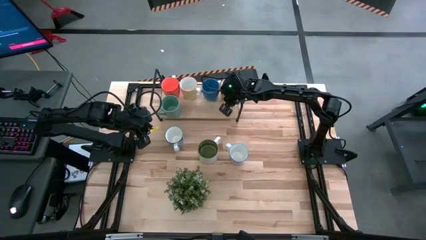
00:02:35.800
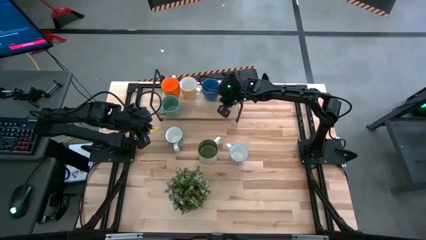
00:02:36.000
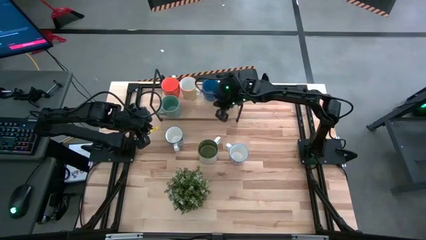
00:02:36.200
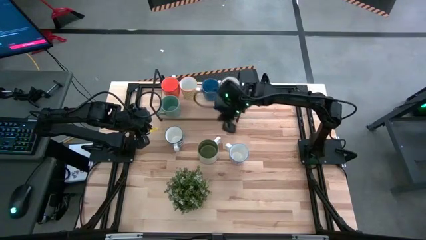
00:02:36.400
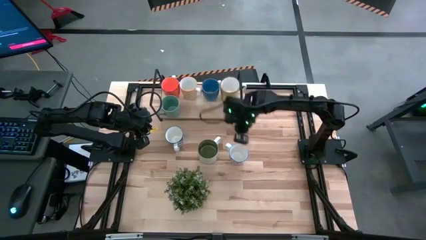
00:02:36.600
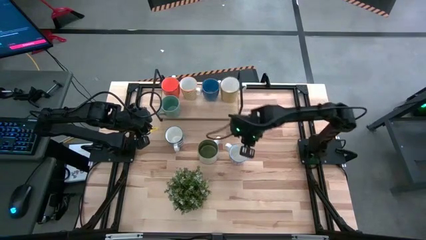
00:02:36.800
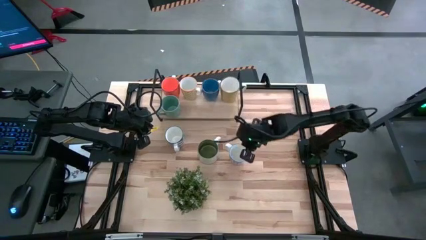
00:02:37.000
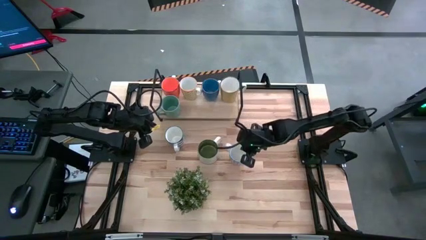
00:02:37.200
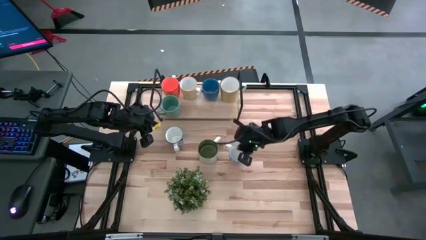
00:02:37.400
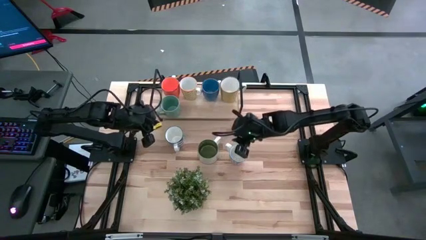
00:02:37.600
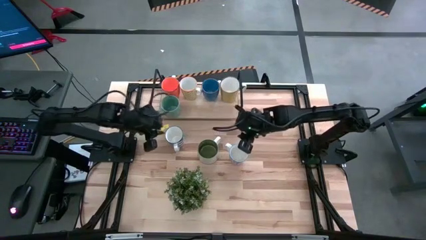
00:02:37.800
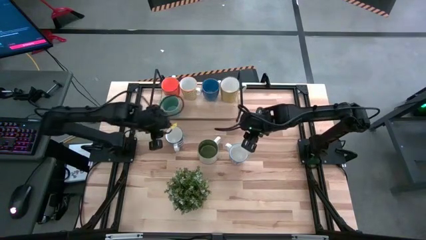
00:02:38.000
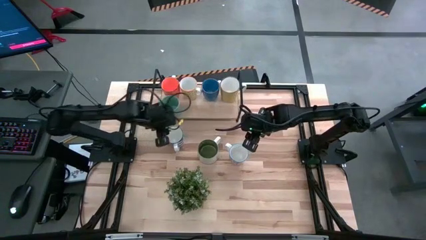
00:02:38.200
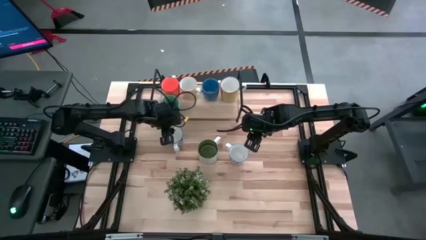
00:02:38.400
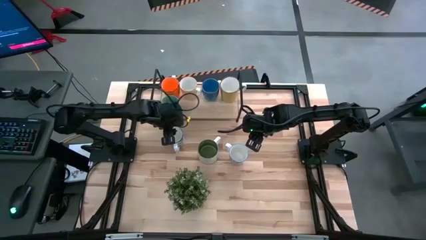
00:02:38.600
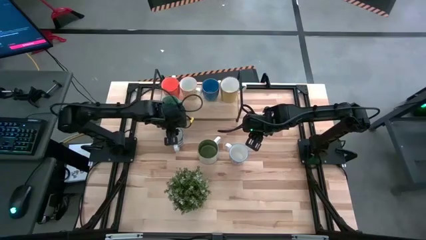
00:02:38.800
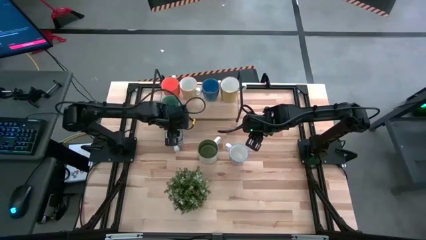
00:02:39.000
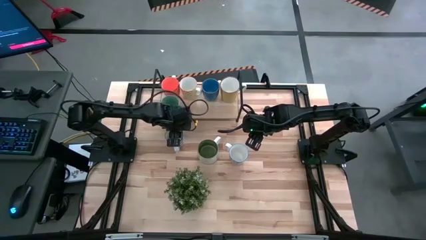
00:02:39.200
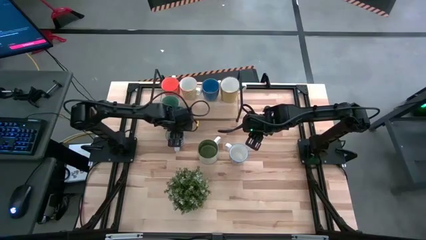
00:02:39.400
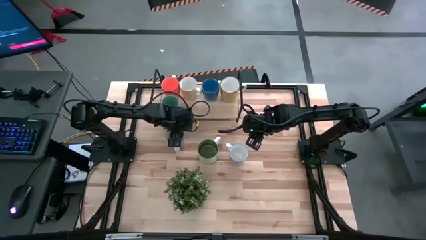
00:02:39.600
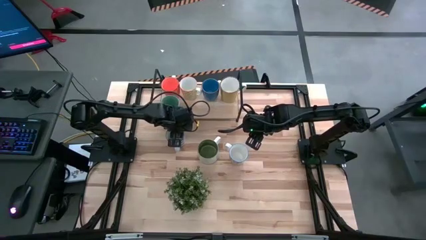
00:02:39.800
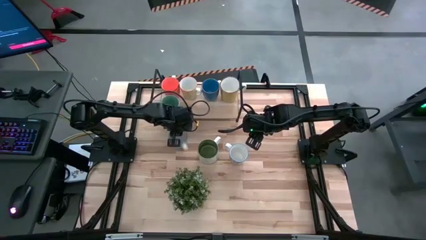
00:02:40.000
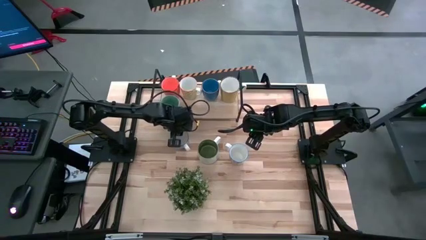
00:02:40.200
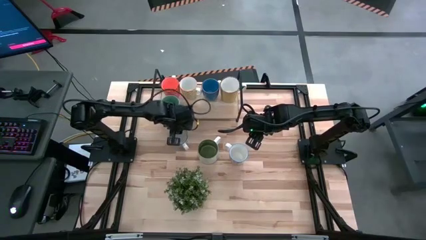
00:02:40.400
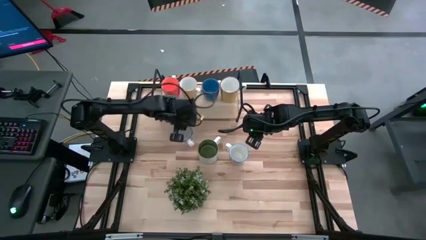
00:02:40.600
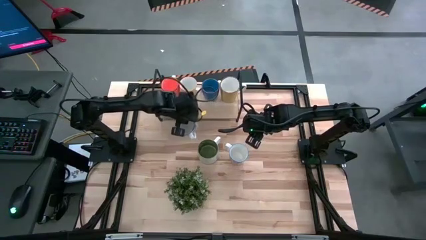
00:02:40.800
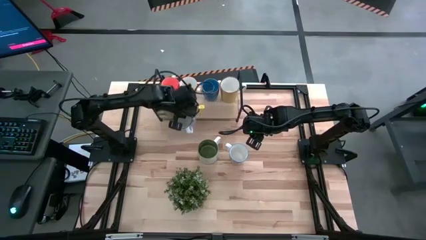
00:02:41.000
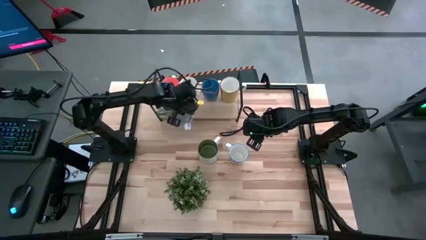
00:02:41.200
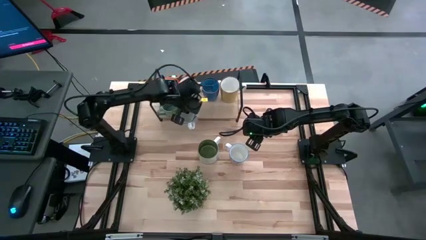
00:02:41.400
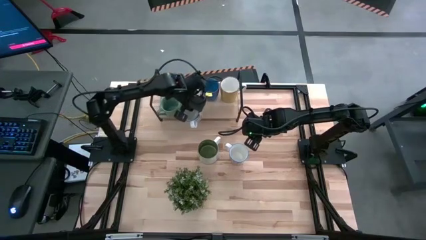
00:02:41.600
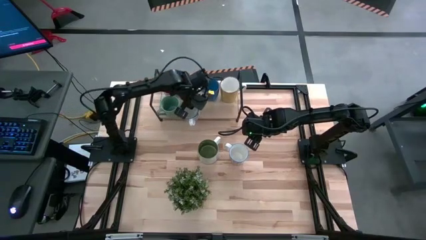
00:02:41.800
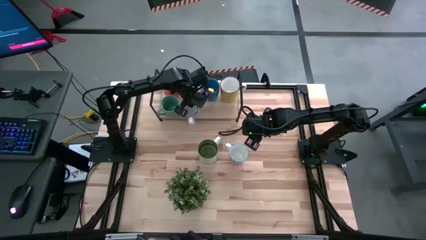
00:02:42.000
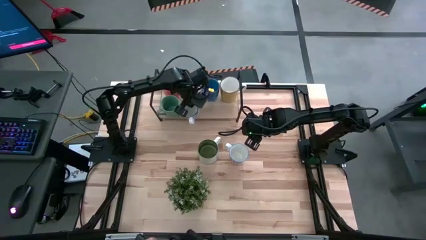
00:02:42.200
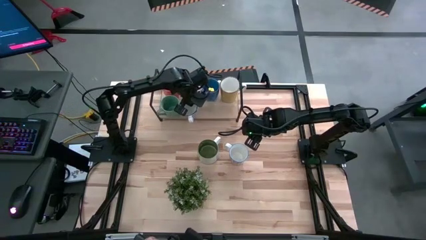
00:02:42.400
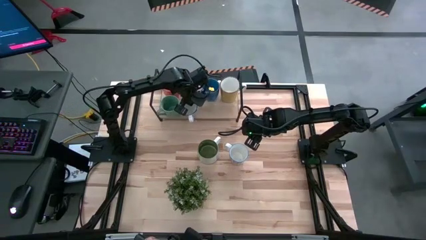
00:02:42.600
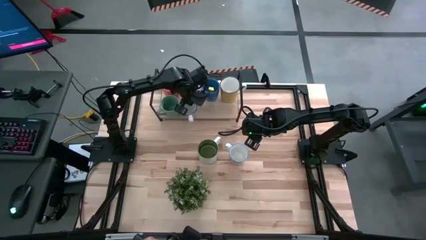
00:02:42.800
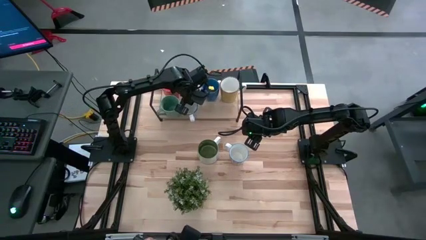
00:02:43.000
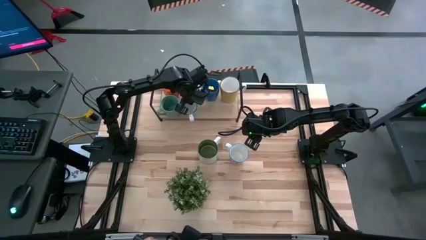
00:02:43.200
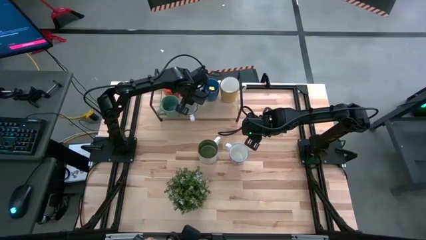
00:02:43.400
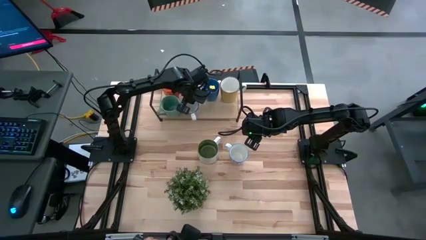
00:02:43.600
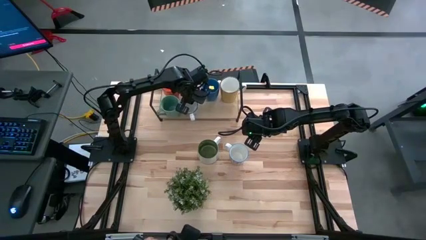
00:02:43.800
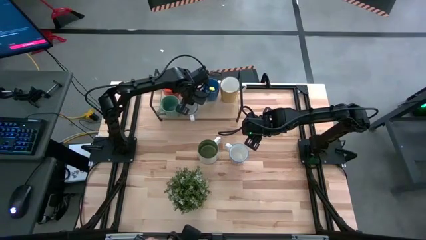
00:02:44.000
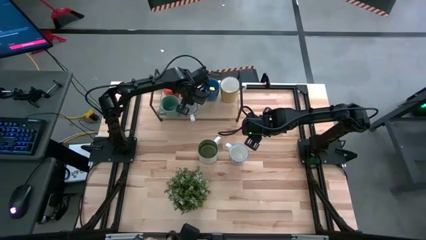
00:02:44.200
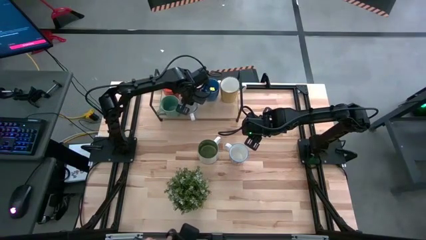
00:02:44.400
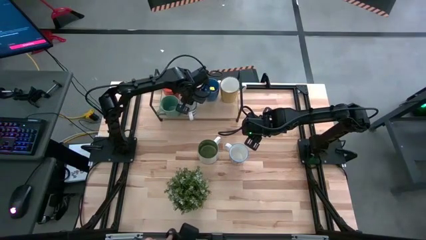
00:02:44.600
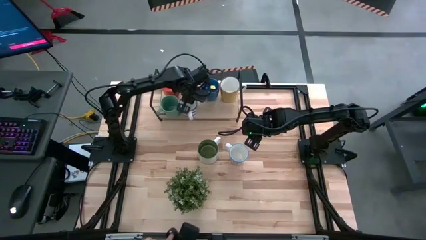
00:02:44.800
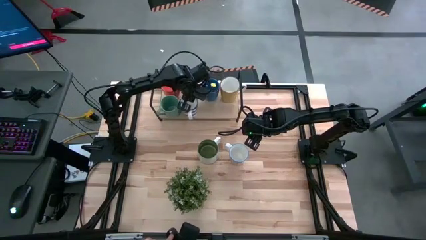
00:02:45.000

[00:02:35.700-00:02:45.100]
Task: Place coffee mugs
Put the blue patterned mug on the shelf

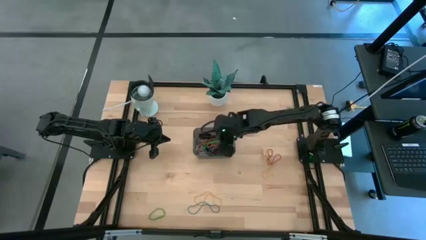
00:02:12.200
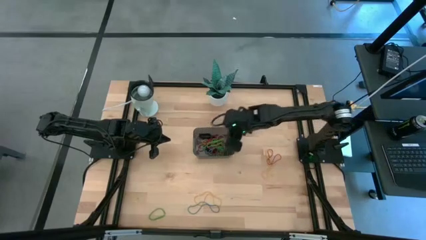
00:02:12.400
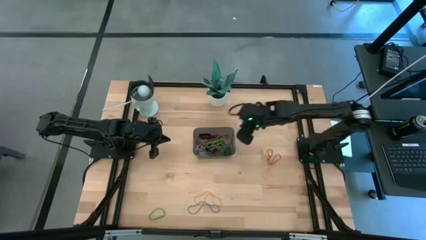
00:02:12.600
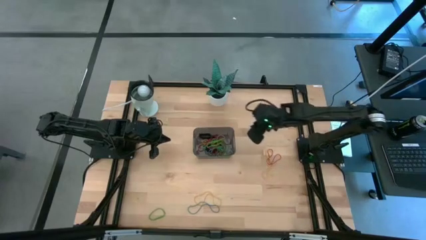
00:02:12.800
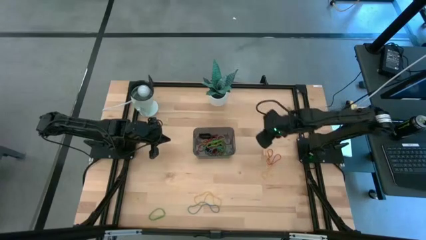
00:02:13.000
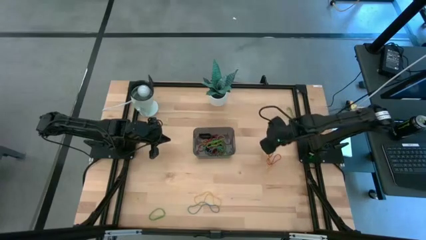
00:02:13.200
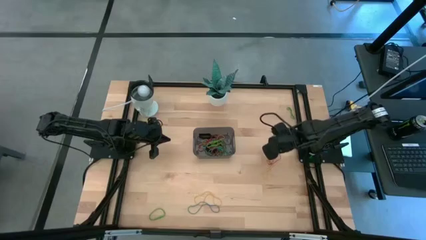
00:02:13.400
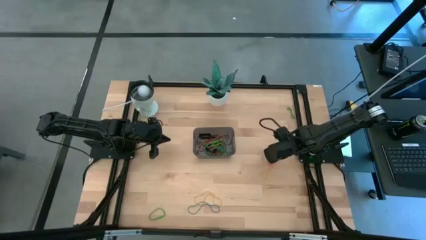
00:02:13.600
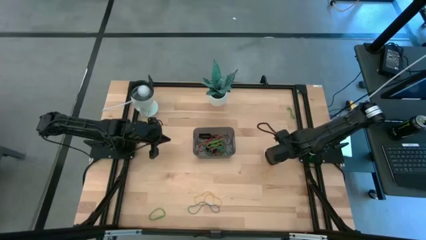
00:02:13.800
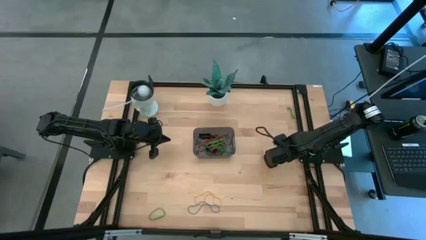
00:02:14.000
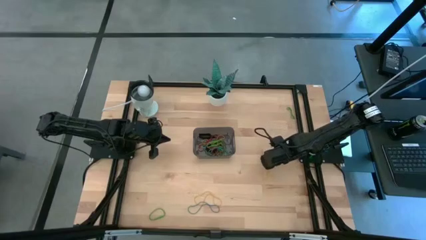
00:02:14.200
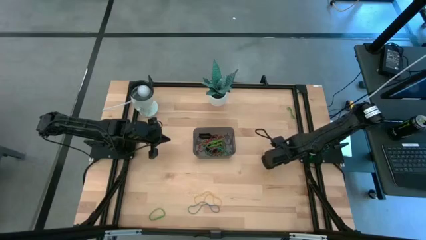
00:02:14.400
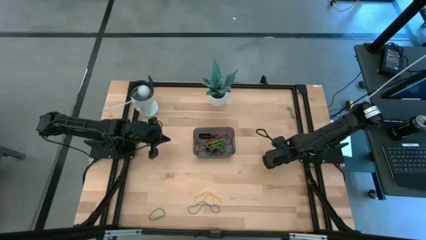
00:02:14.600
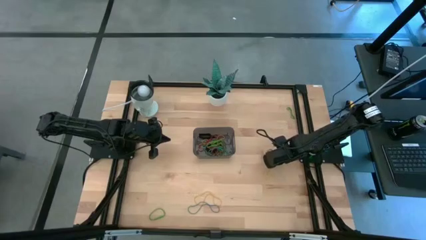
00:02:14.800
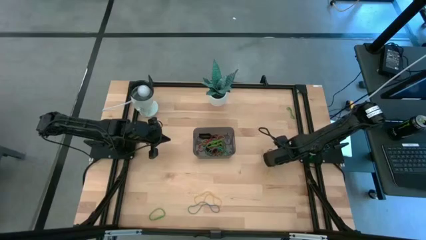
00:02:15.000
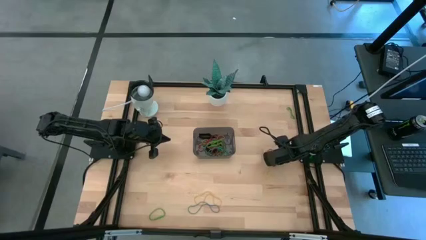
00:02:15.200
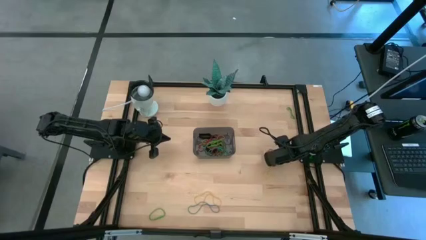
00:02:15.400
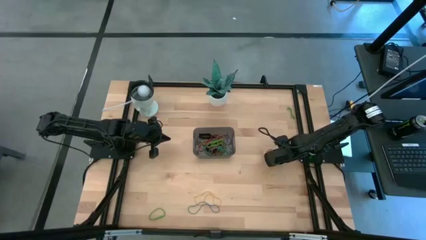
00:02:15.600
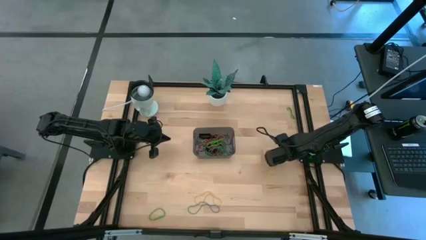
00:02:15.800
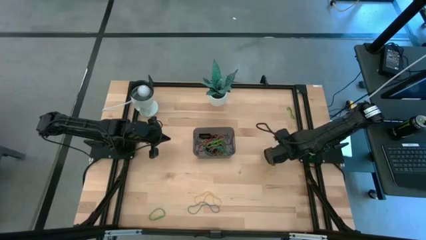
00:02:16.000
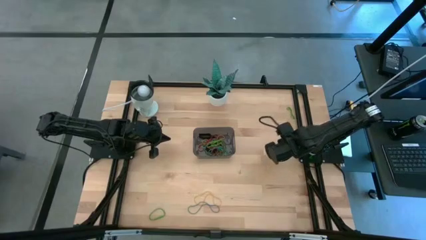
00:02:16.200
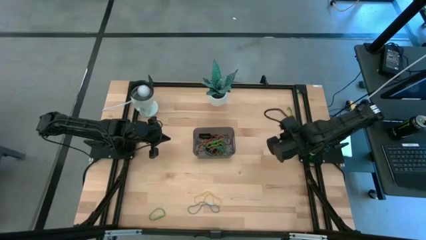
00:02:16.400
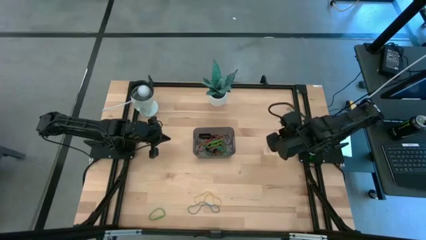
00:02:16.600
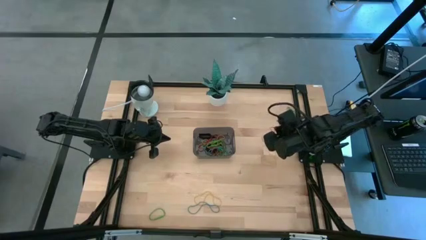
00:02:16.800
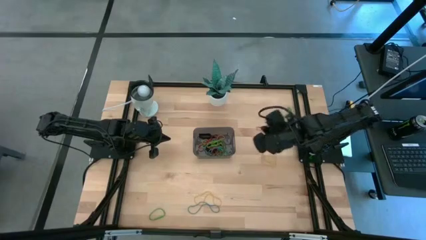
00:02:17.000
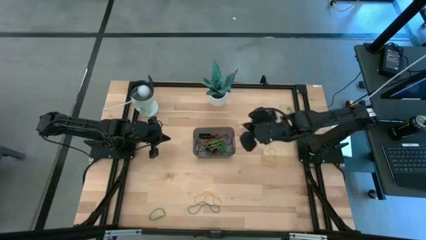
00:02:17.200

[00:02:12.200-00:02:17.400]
Task: Pick and place rubber bands into bin
Put the red rubber band into the black bin
